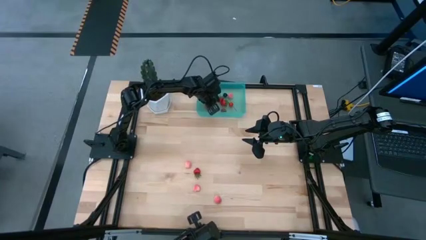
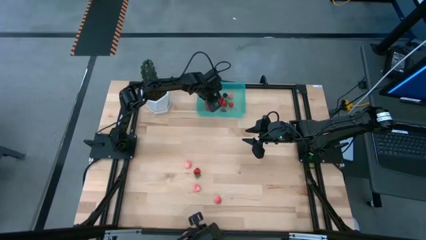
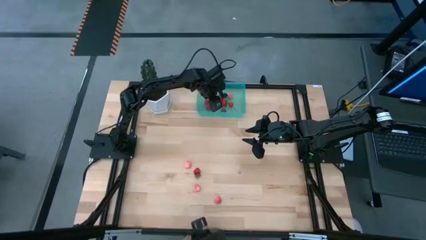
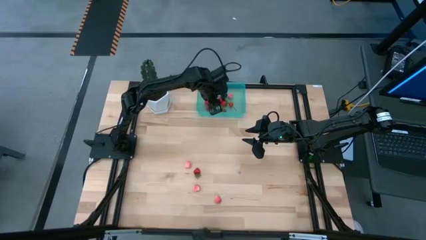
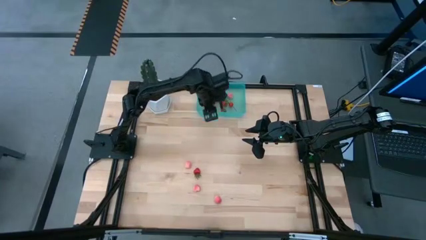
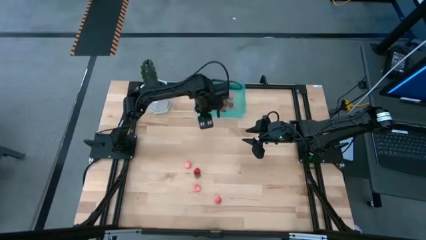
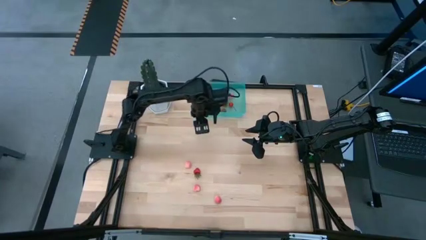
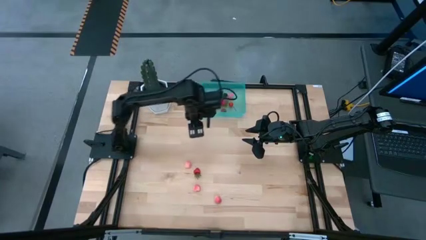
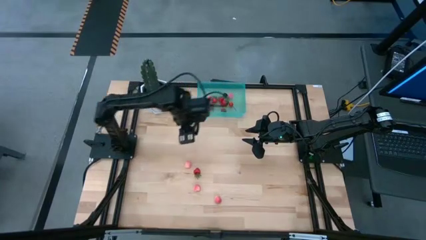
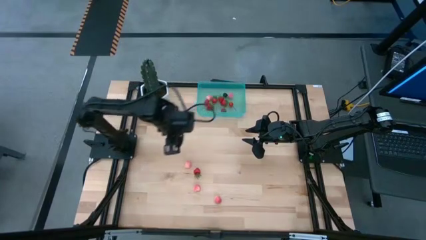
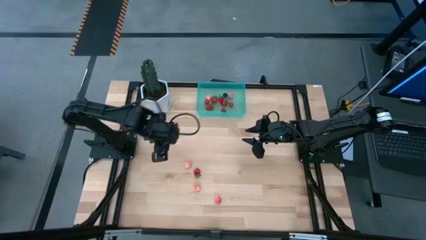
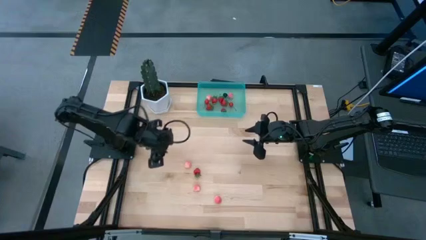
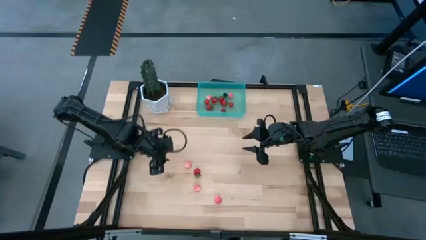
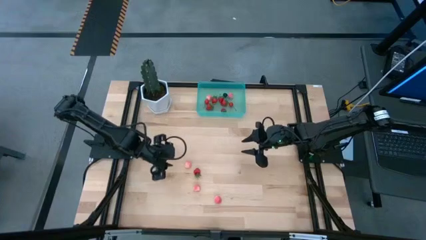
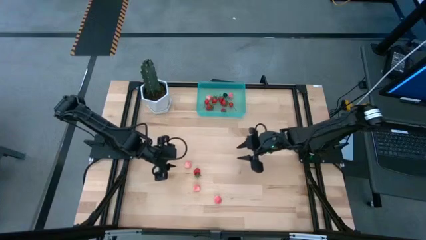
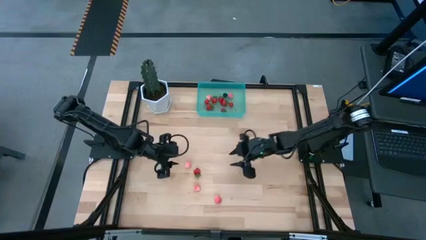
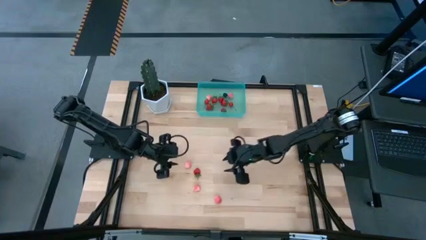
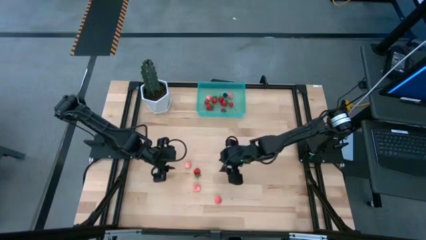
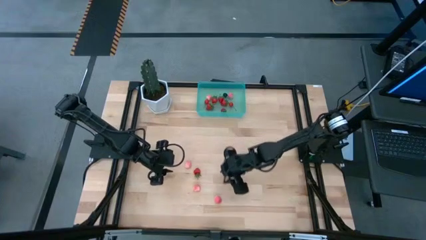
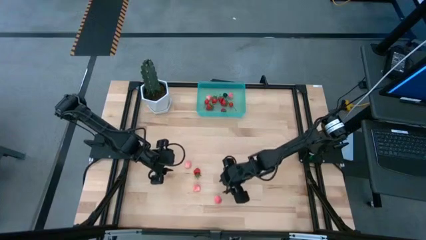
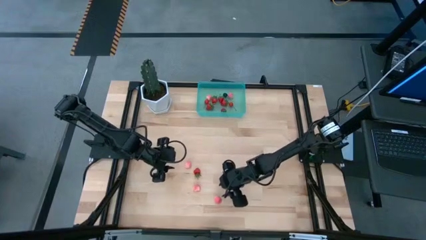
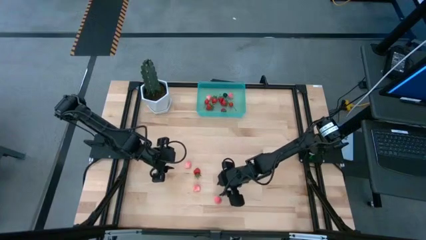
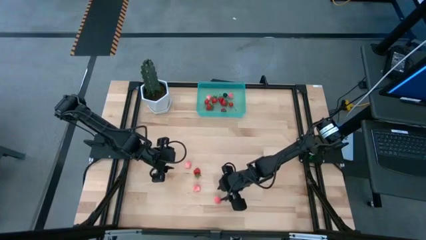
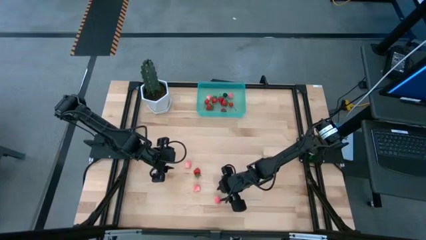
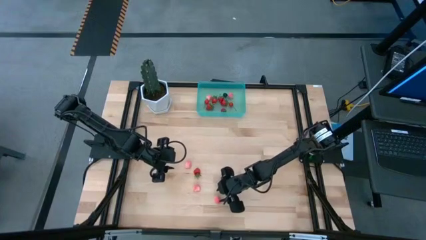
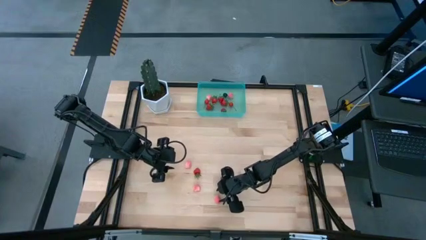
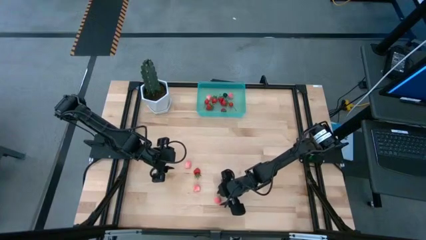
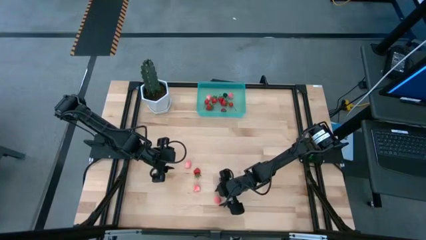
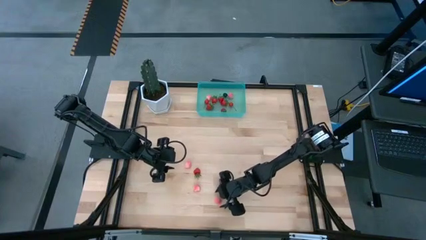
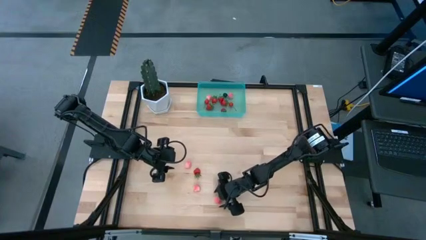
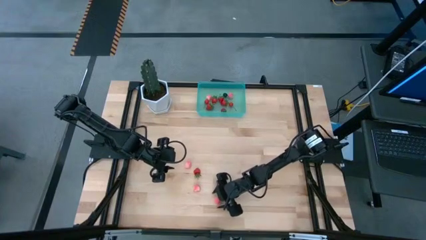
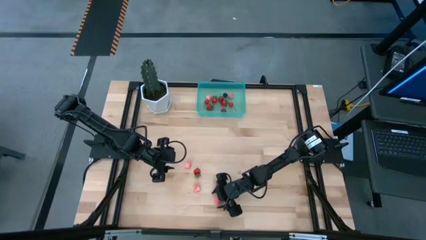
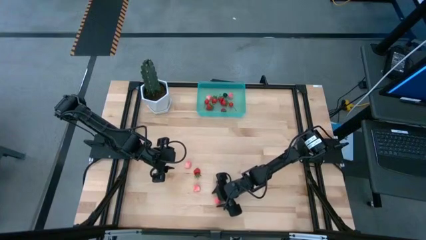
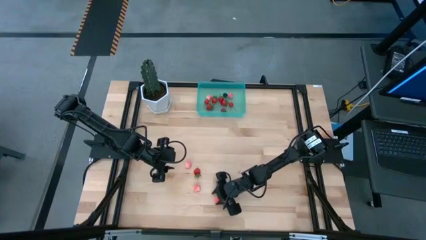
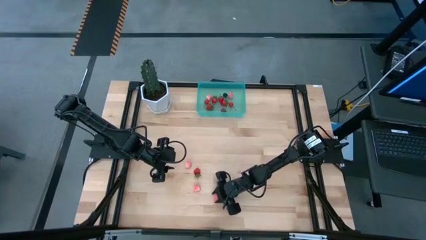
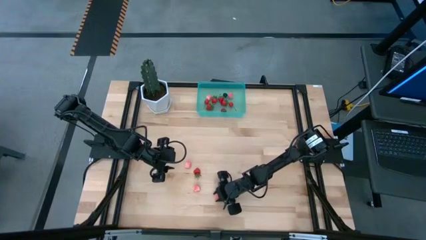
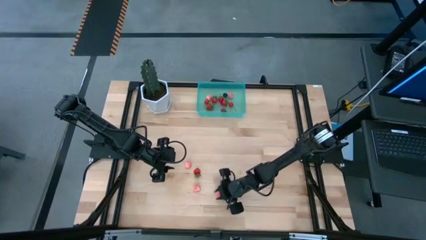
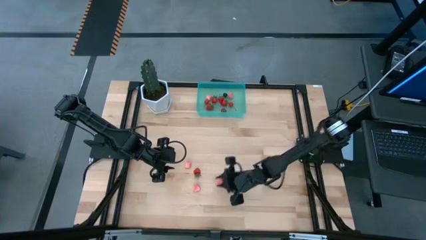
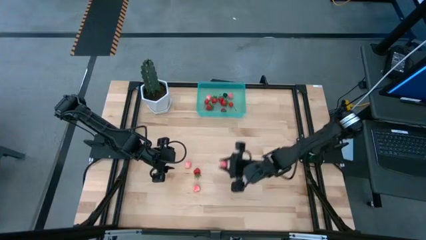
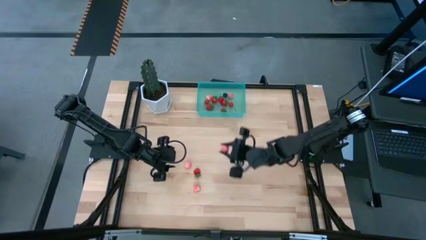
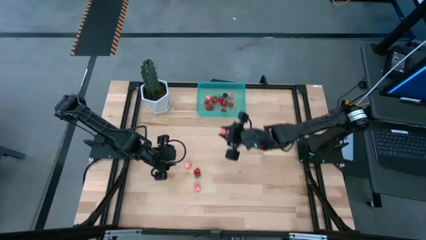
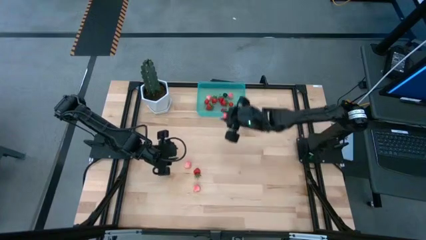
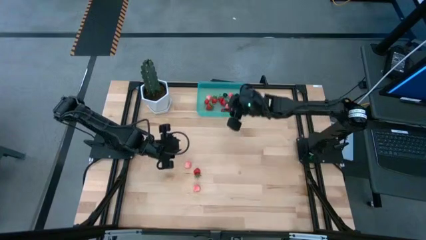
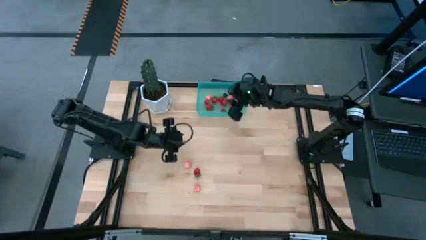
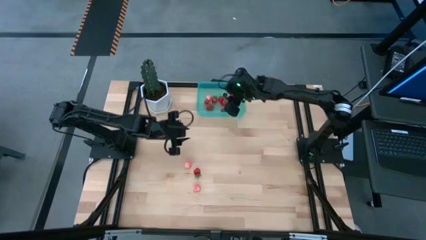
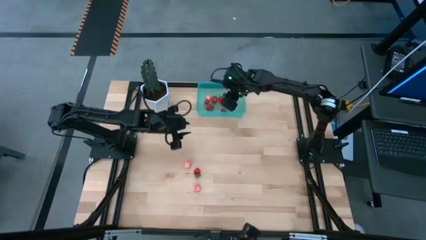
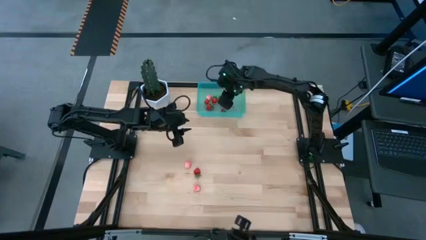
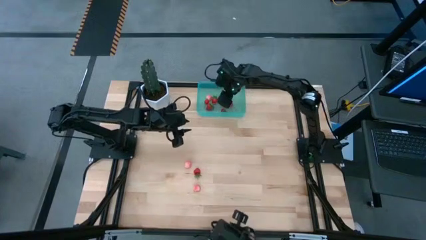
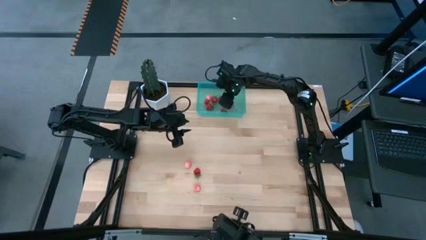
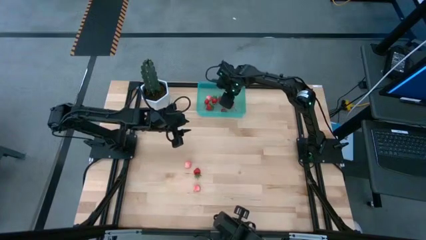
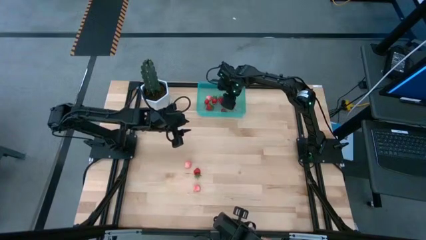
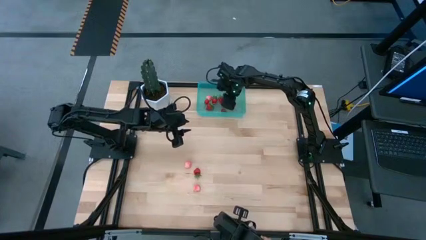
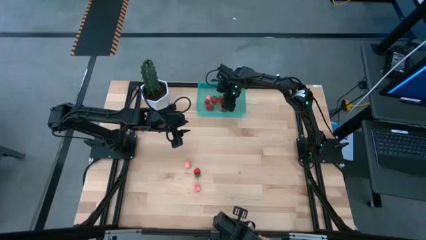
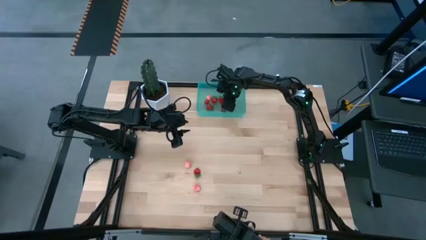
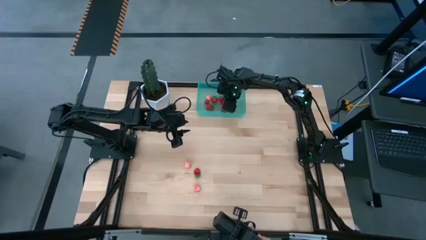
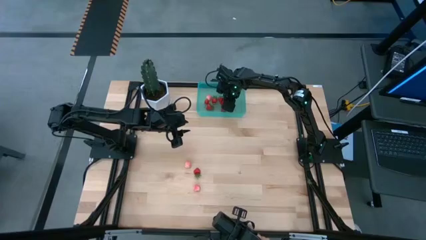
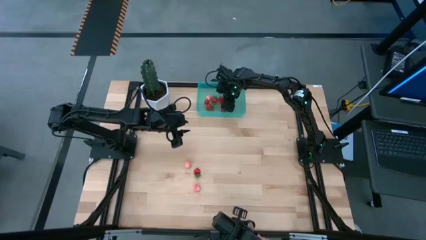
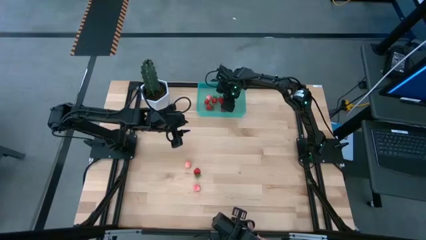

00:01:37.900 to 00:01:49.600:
Task: Pick and placing Produce into tupperware
Put the peach into the container

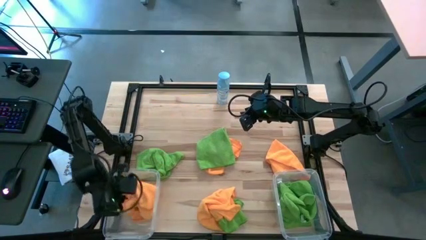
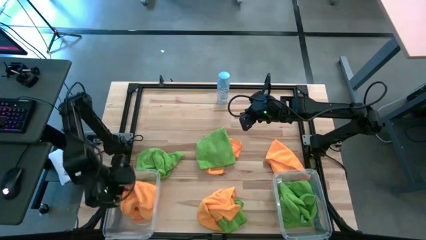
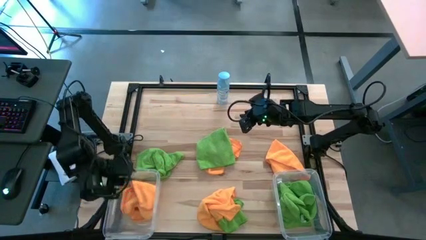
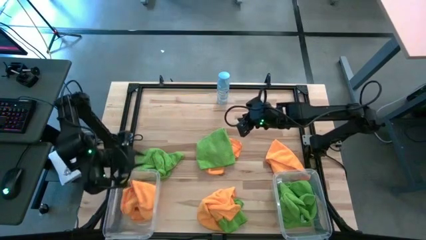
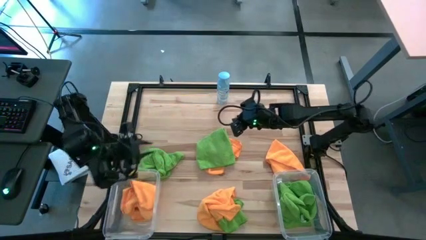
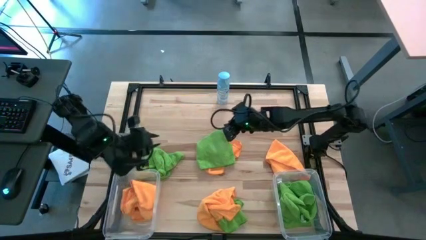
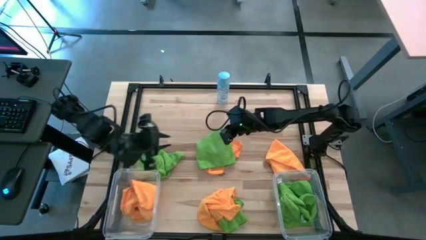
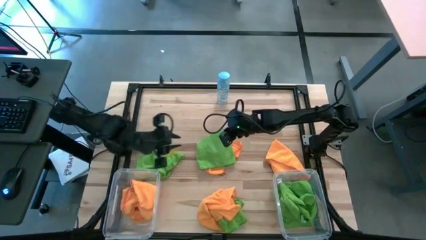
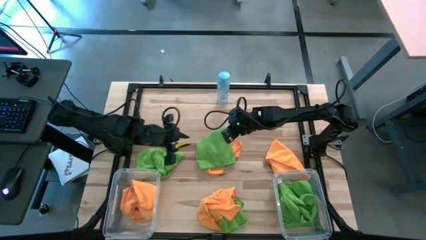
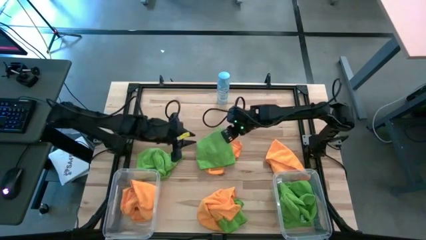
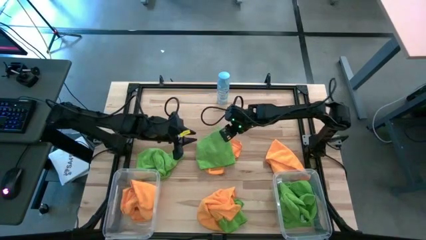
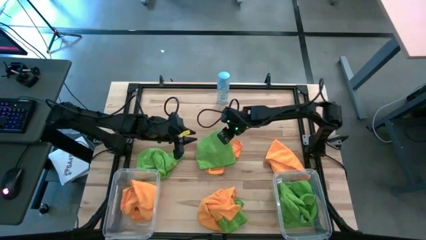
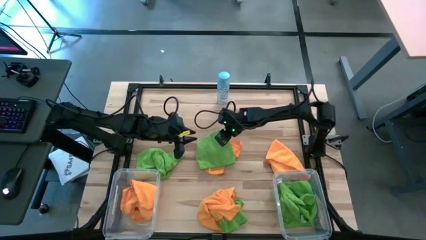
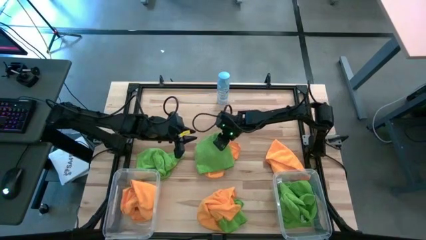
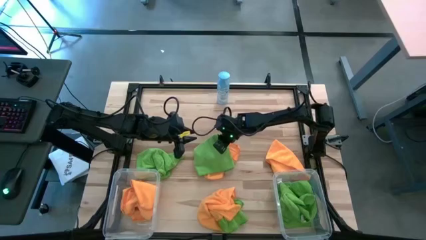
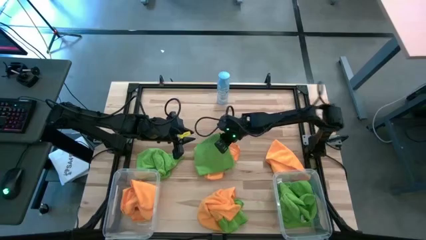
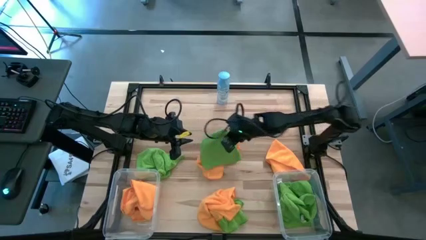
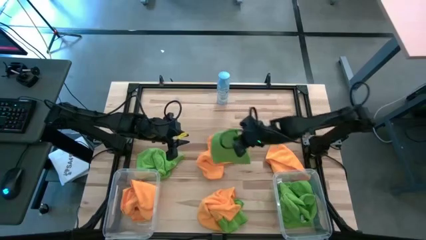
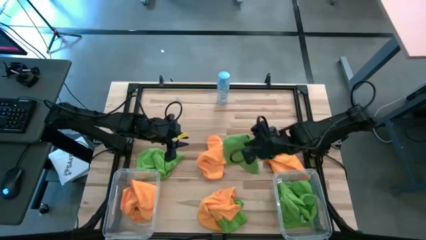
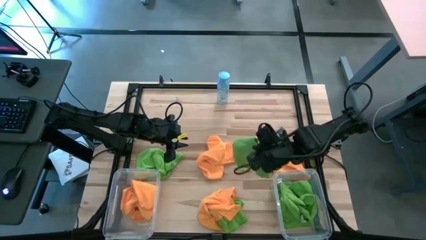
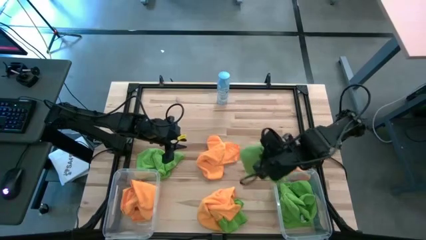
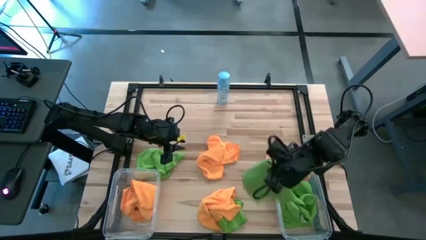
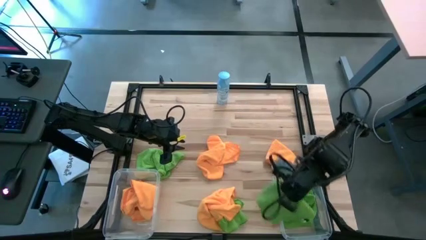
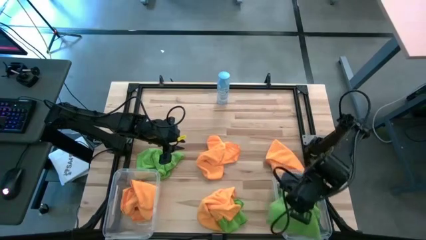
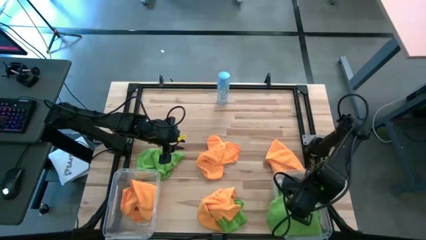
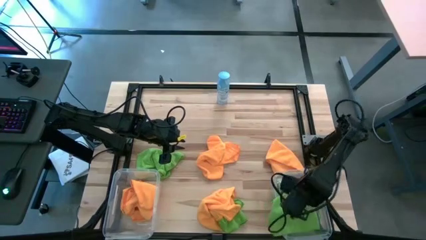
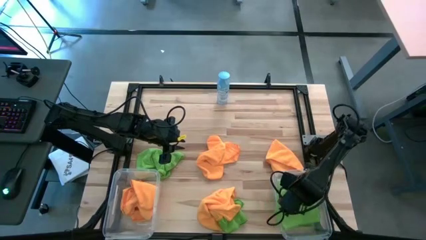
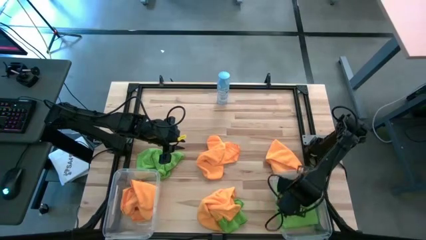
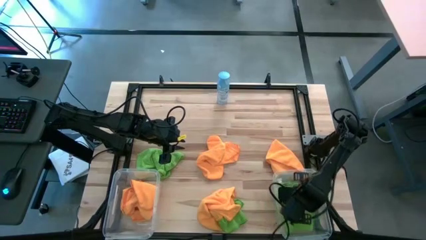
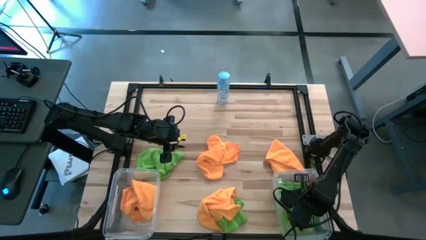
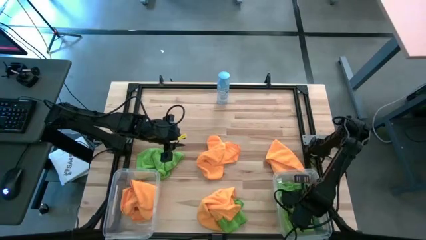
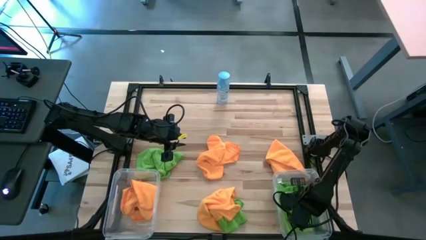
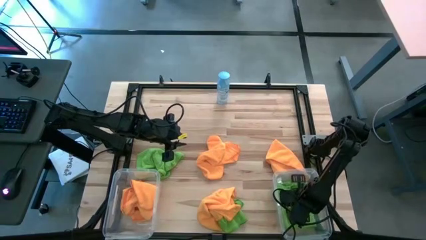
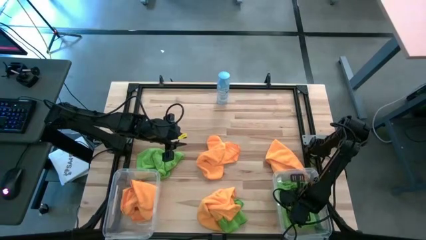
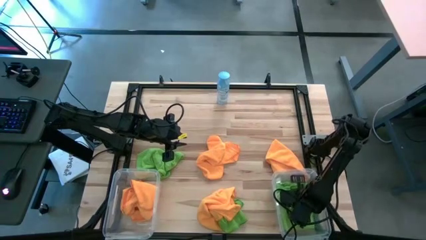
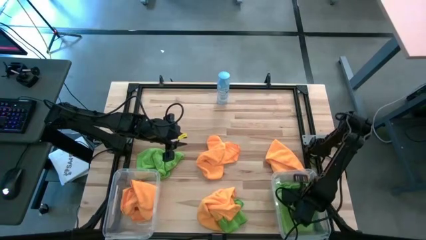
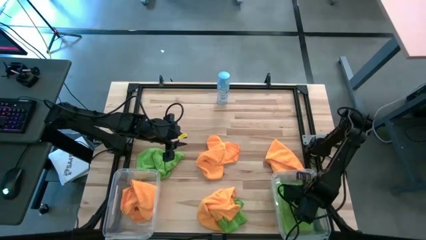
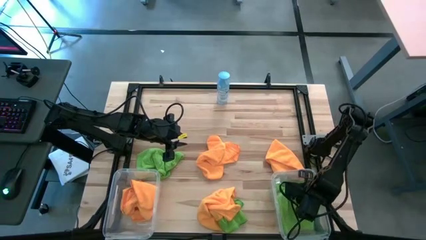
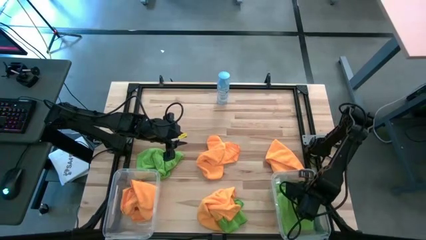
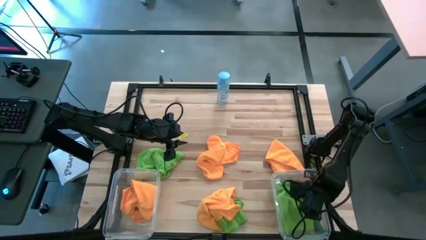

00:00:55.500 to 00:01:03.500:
Task: Sort microfiber towel by color & place in baskets
Put the green microfiber cloth into the right transparent bin
